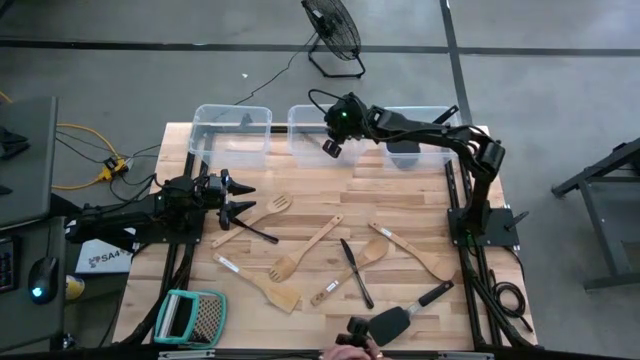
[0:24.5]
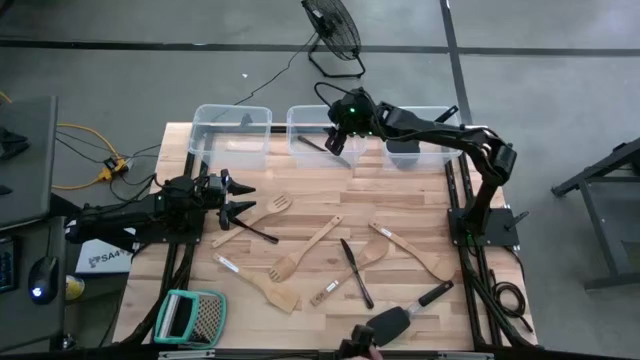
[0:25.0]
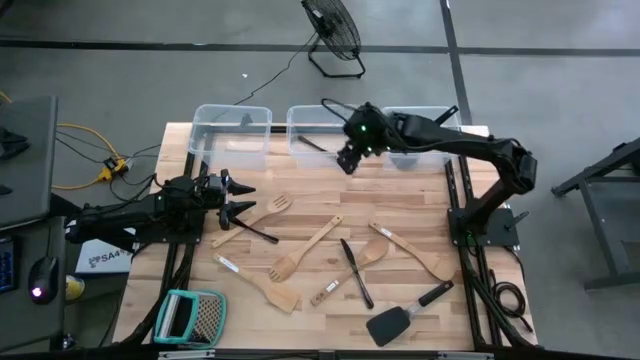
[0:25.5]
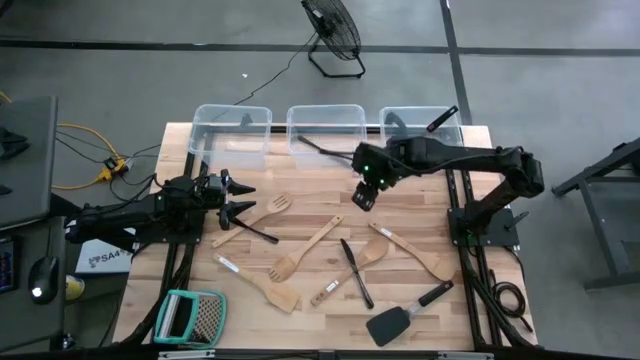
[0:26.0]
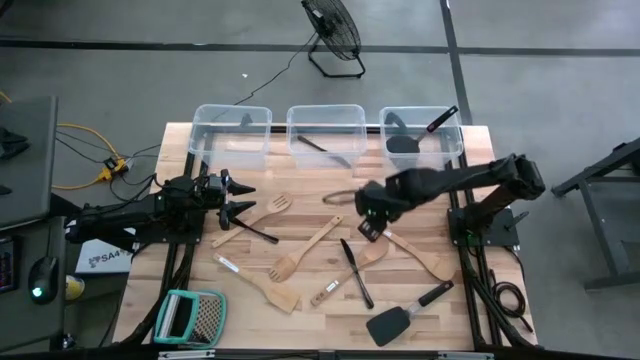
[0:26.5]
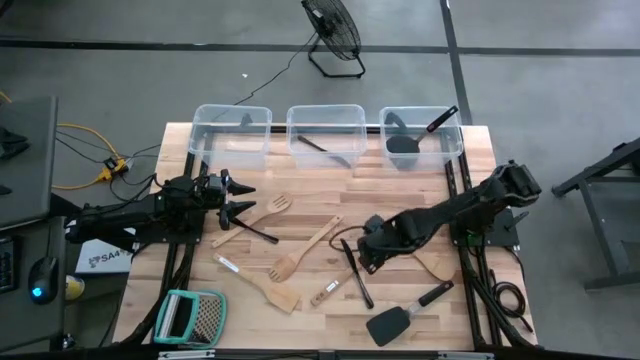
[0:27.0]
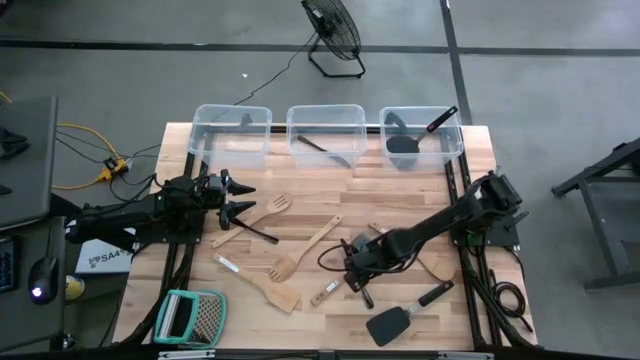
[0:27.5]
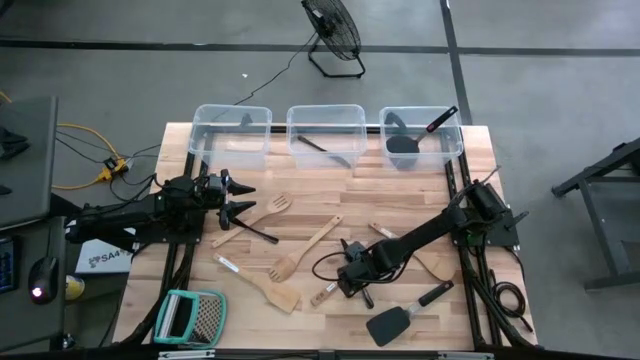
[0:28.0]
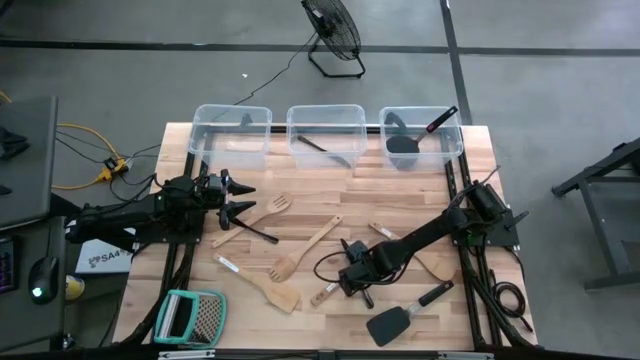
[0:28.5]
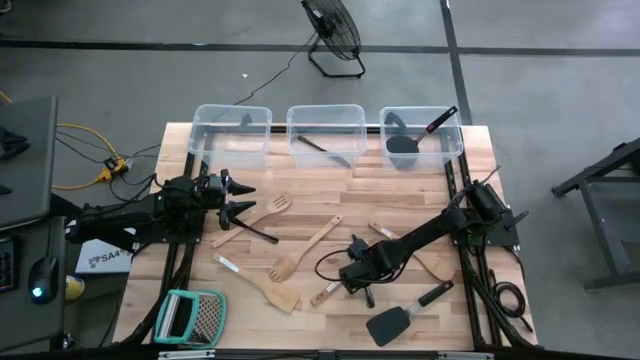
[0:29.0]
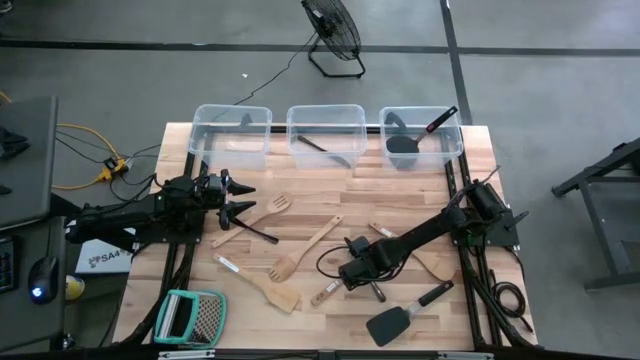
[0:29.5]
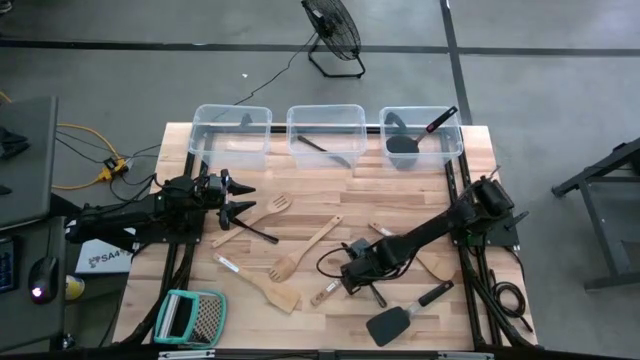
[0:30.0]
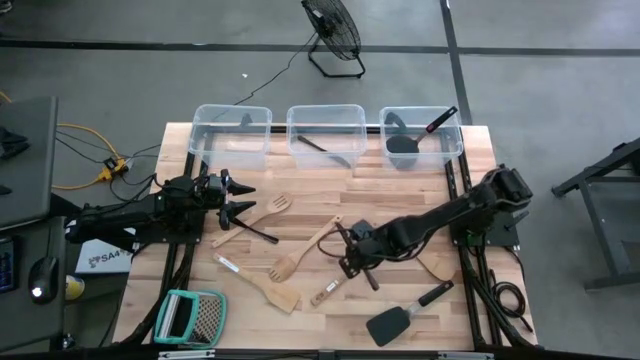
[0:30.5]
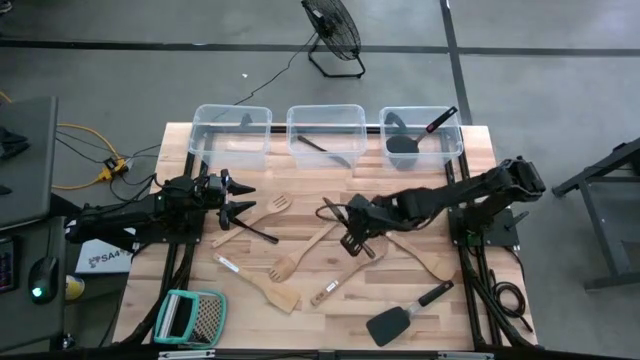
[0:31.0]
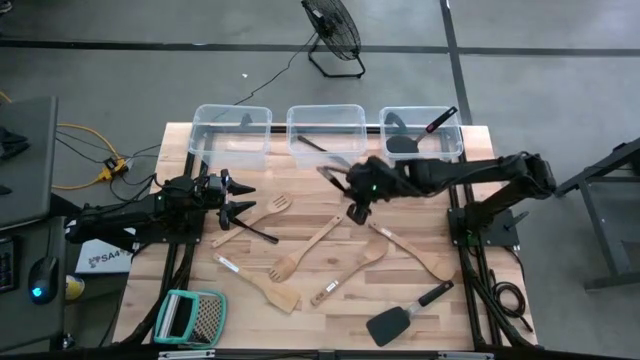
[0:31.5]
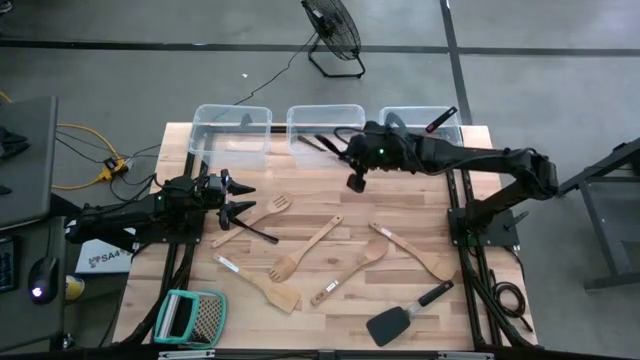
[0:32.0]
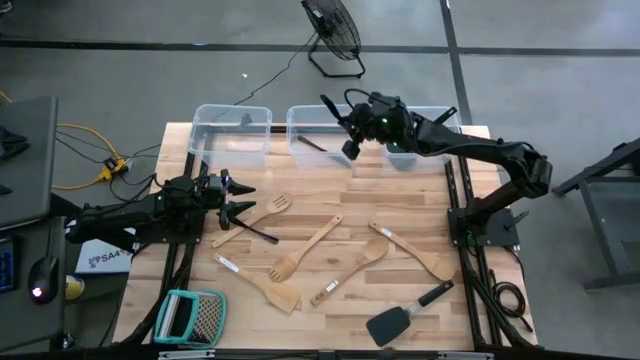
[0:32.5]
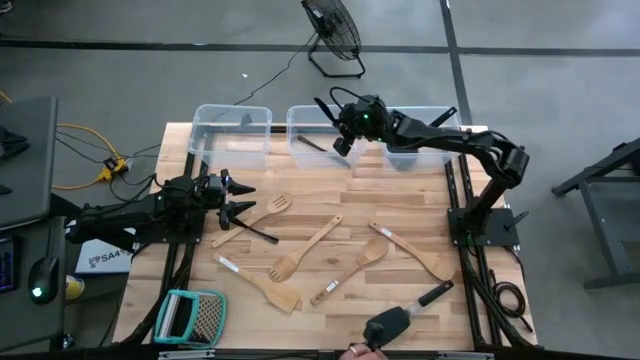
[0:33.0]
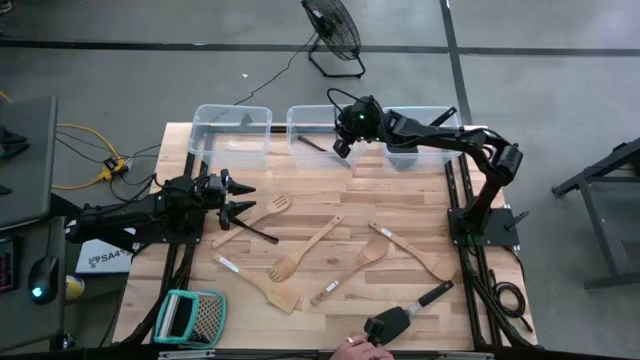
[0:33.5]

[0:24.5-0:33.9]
Task: Pick & Place Kitchen Items
Put the right black table knife into the middle transparent bin

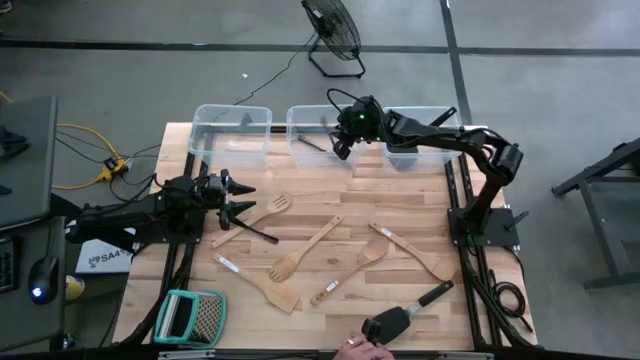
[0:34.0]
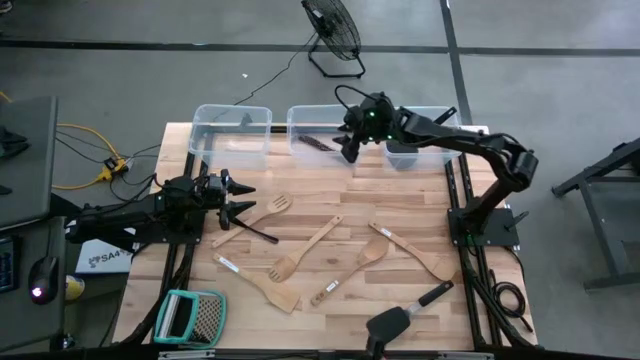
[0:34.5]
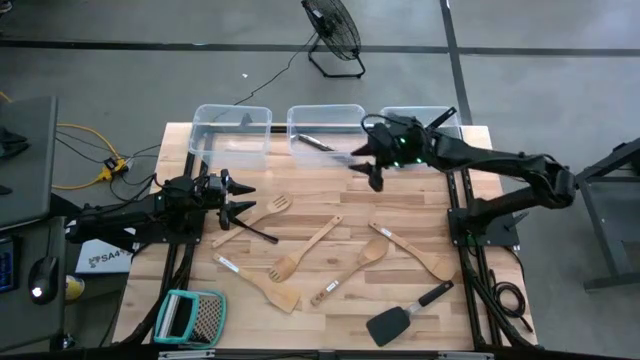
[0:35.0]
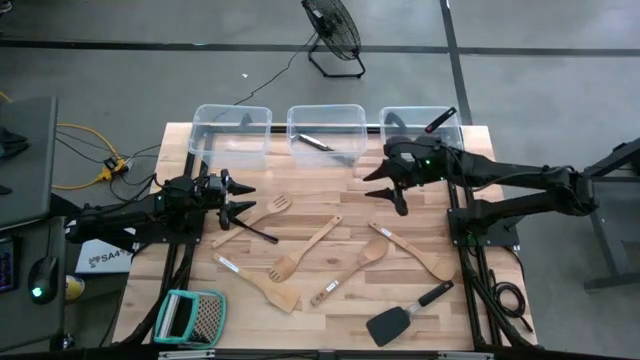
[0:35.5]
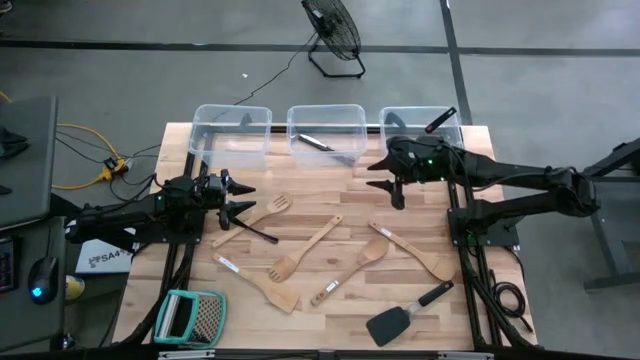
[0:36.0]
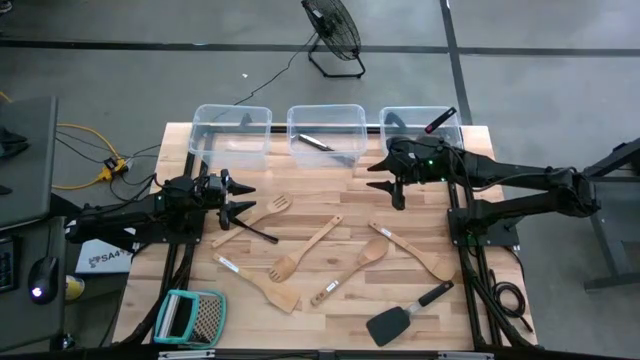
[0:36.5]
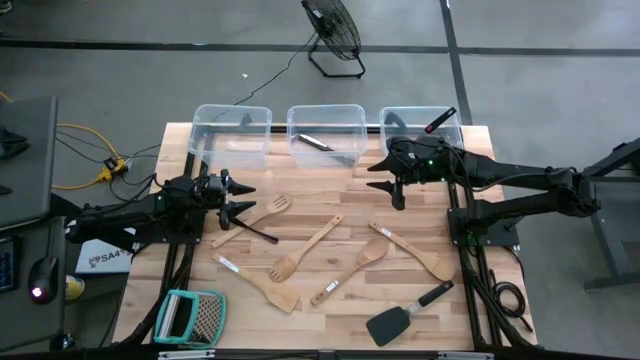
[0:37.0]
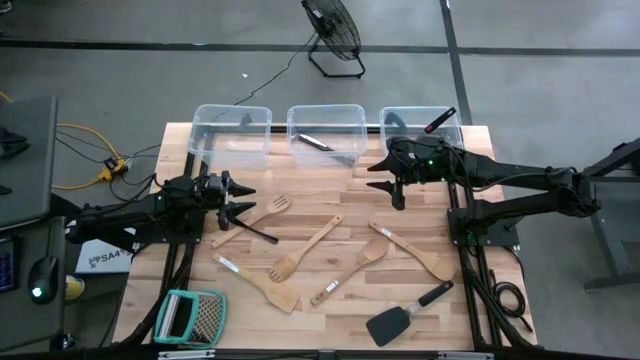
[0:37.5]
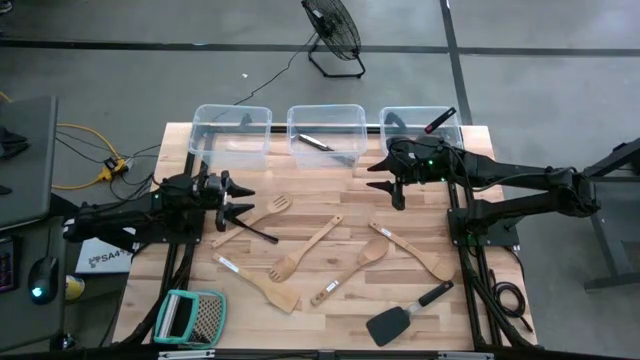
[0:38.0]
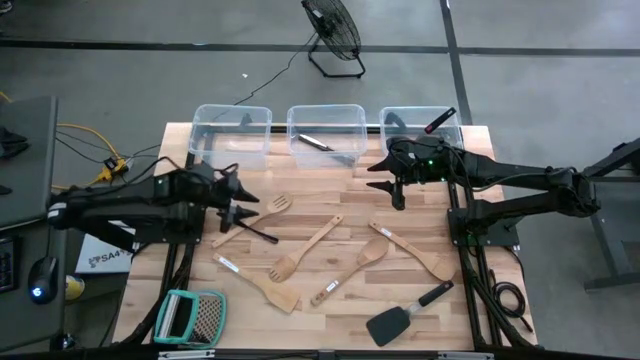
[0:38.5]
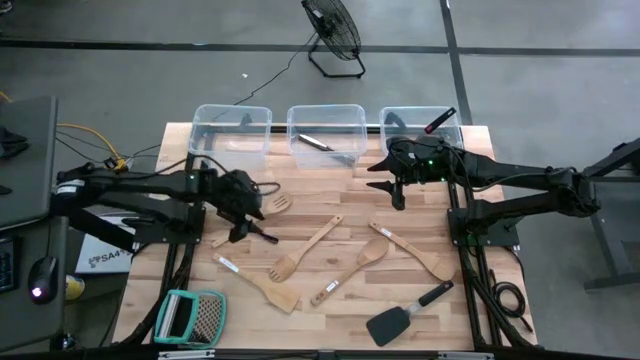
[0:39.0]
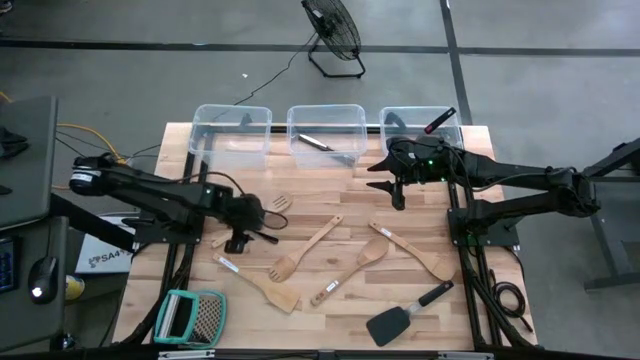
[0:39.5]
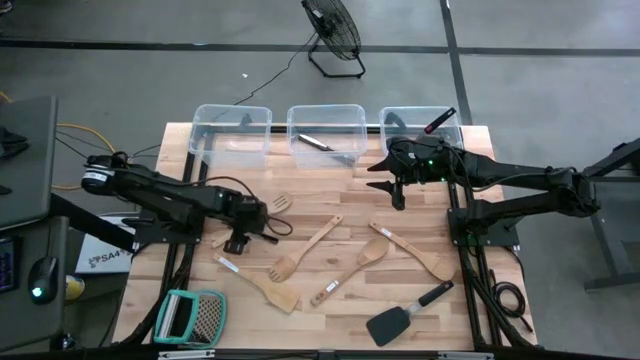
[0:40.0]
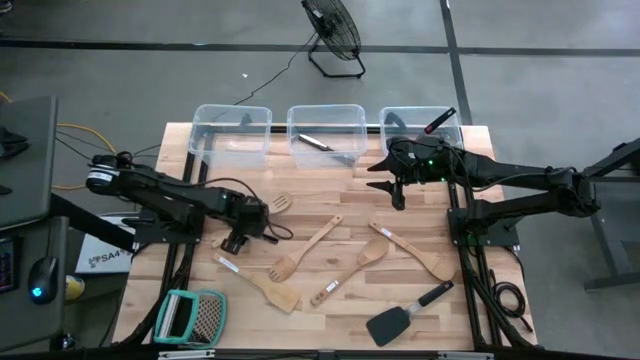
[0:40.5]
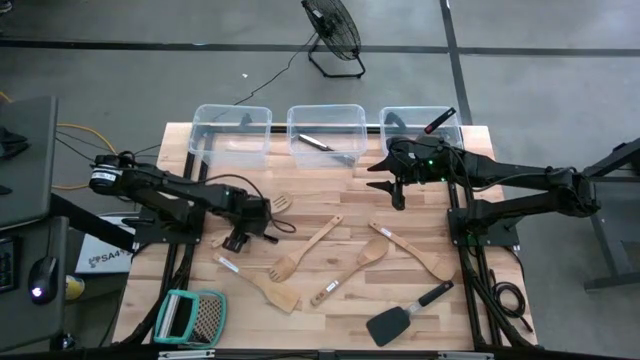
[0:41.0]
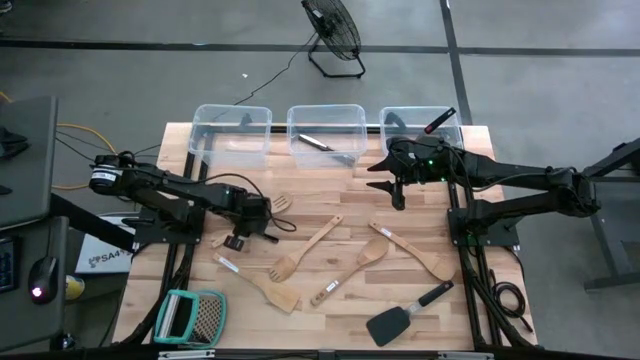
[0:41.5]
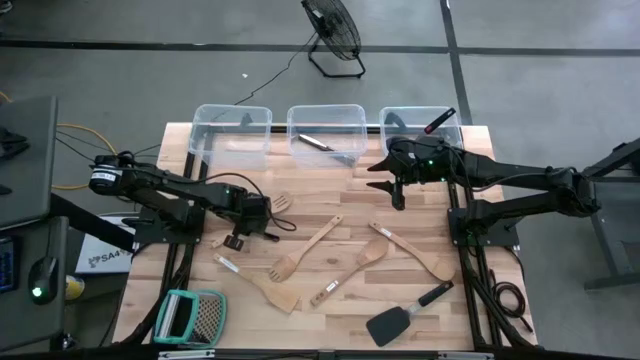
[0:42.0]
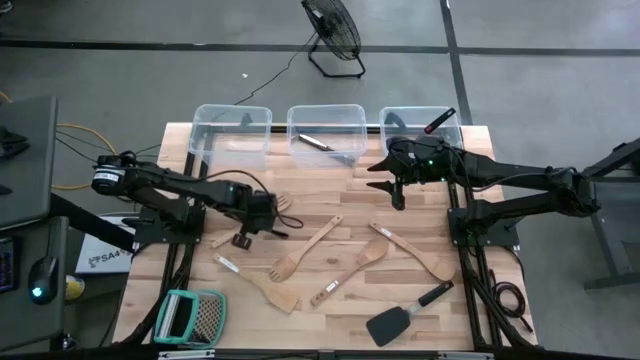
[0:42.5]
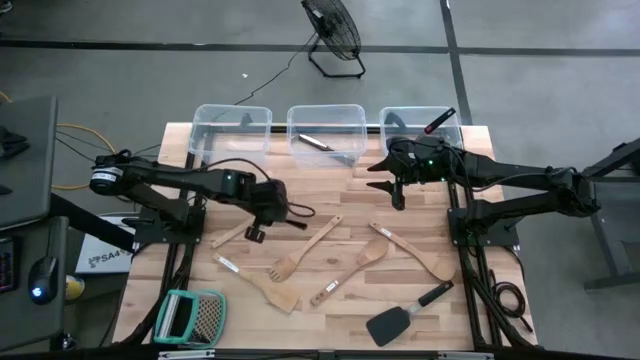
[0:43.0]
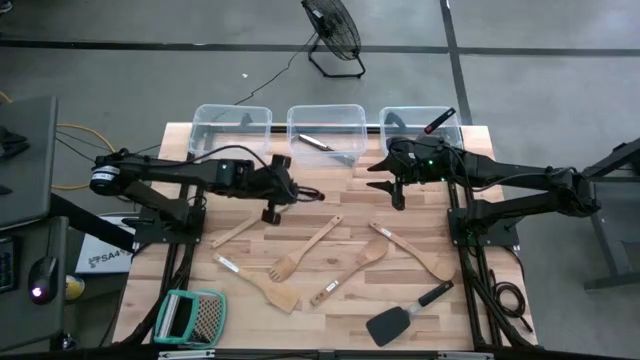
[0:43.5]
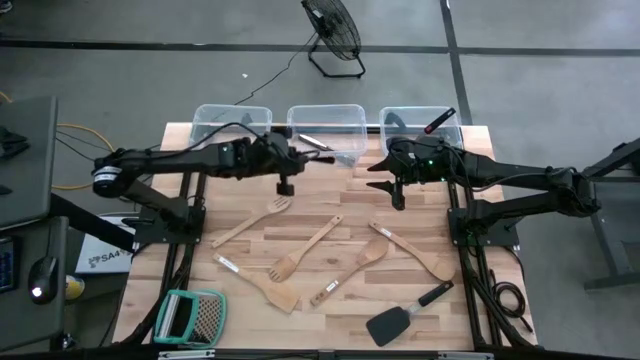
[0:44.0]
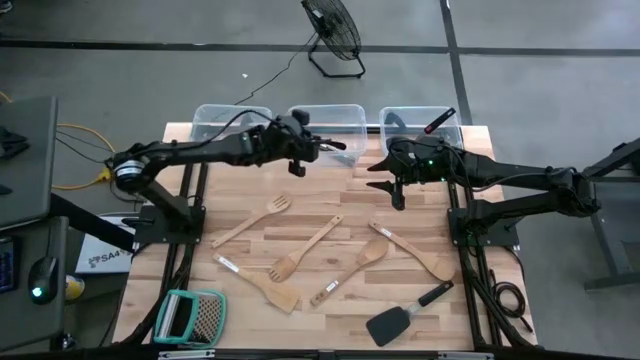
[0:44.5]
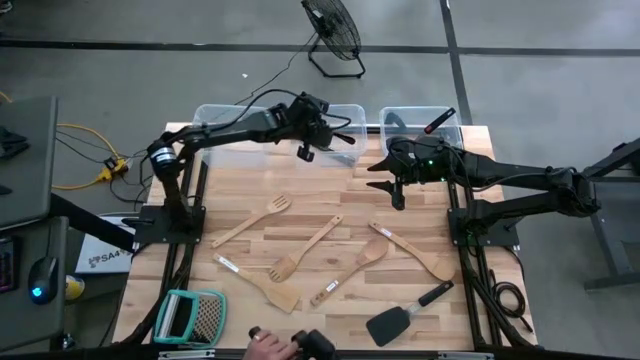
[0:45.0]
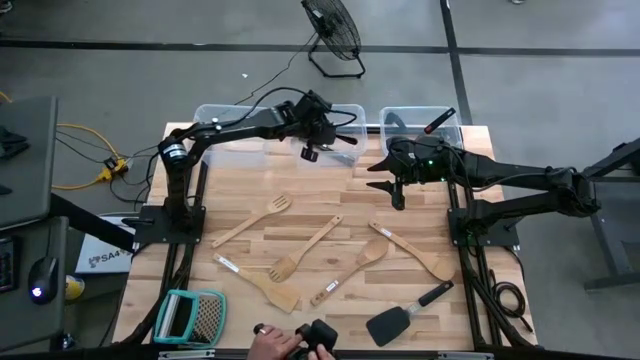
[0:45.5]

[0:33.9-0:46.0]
Put the black table knife into the middle transparent bin
